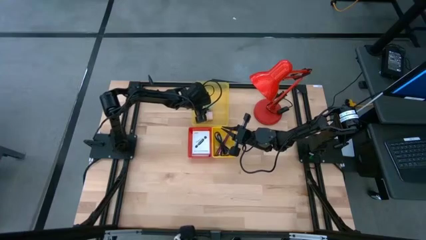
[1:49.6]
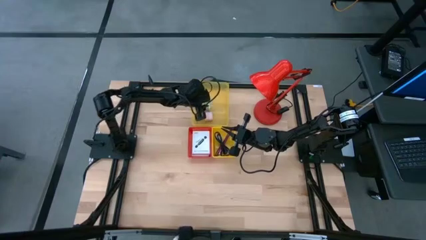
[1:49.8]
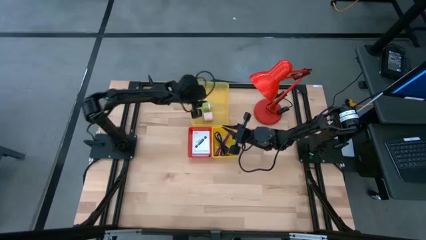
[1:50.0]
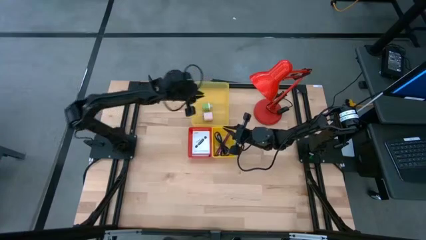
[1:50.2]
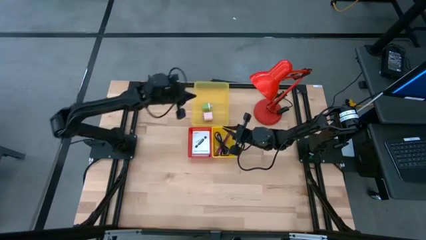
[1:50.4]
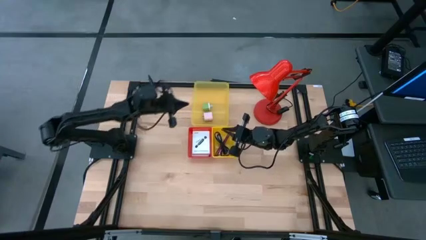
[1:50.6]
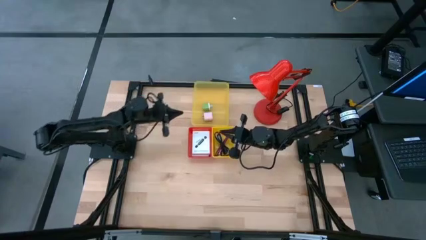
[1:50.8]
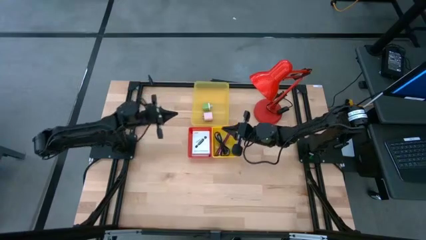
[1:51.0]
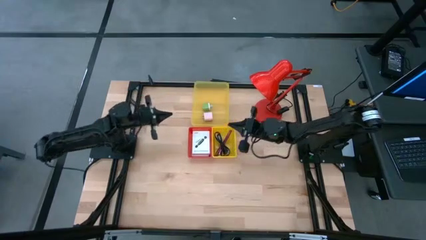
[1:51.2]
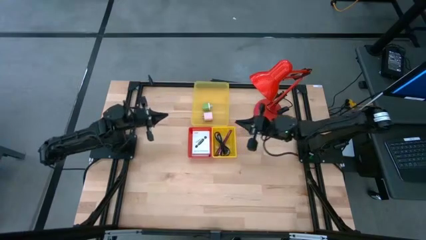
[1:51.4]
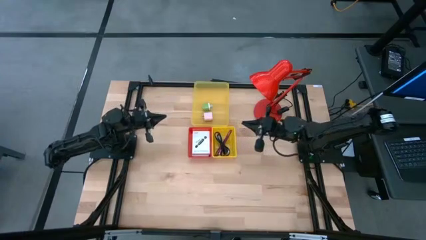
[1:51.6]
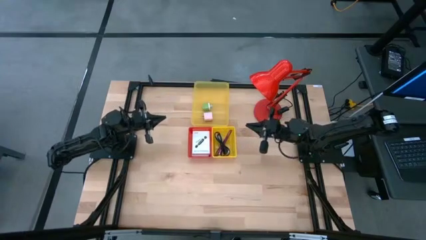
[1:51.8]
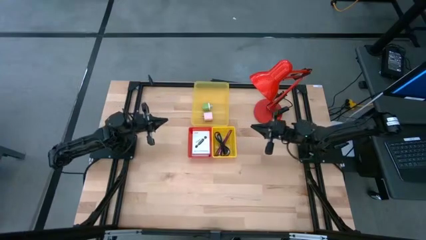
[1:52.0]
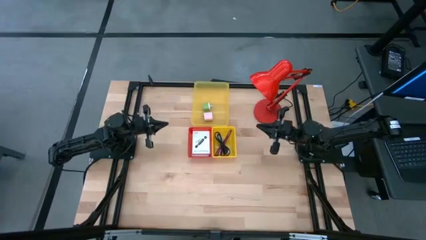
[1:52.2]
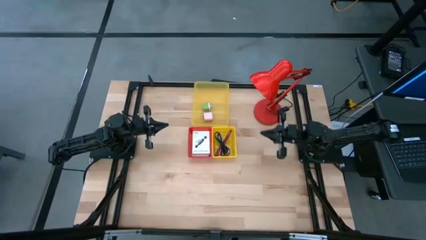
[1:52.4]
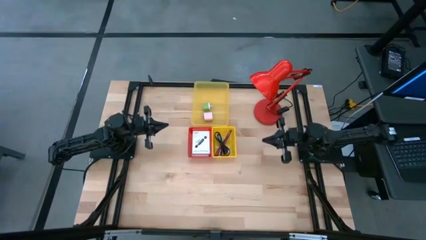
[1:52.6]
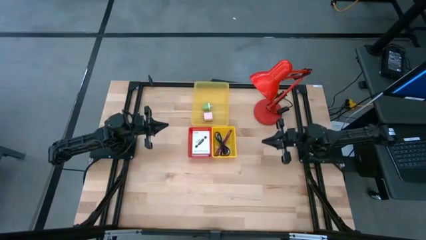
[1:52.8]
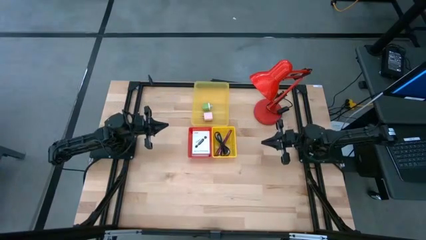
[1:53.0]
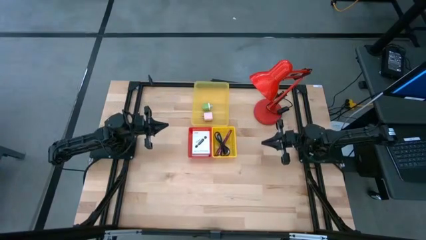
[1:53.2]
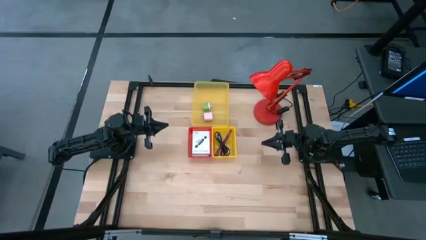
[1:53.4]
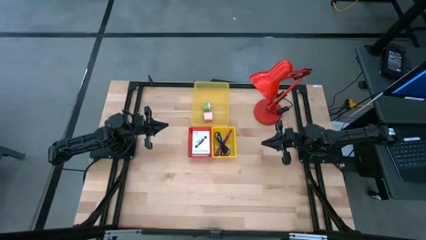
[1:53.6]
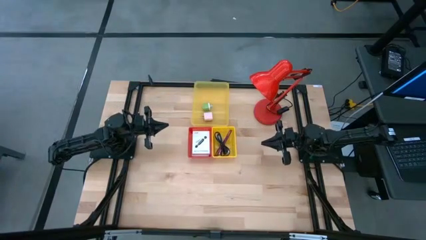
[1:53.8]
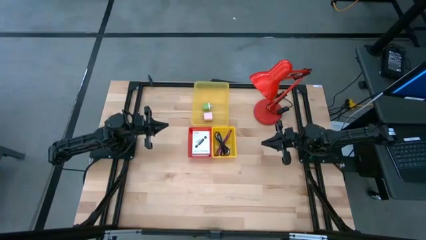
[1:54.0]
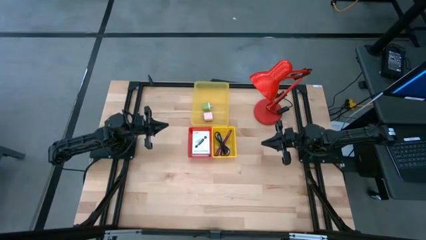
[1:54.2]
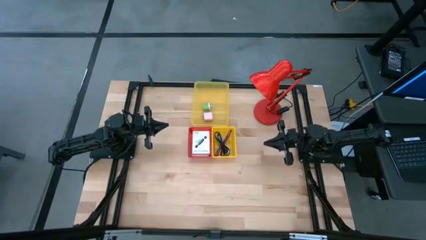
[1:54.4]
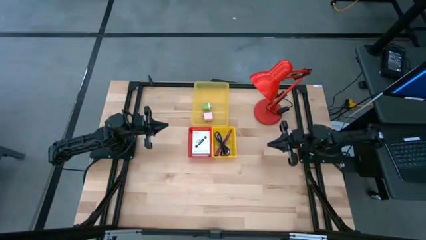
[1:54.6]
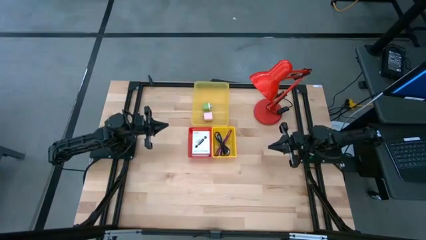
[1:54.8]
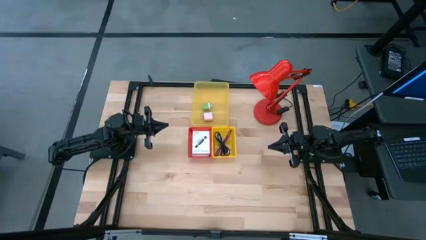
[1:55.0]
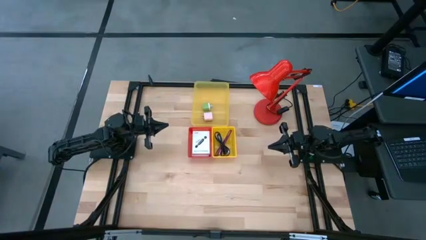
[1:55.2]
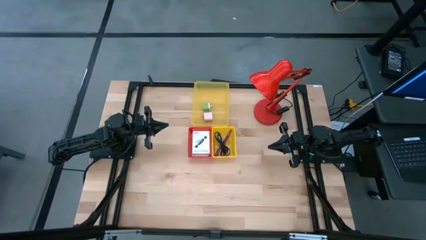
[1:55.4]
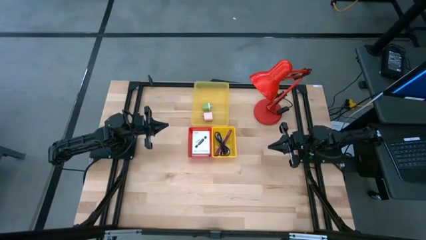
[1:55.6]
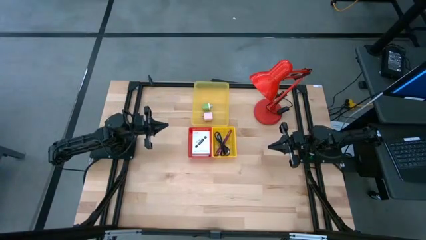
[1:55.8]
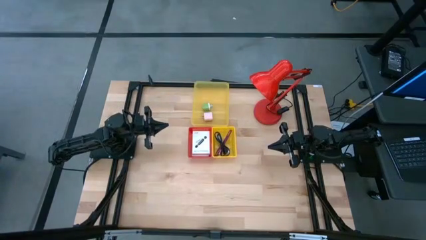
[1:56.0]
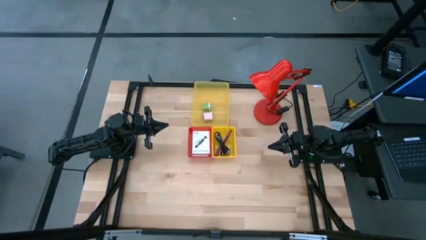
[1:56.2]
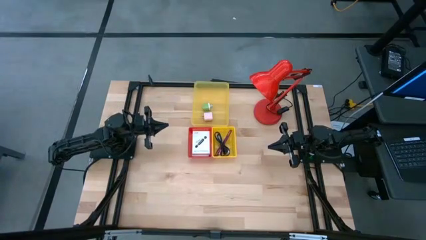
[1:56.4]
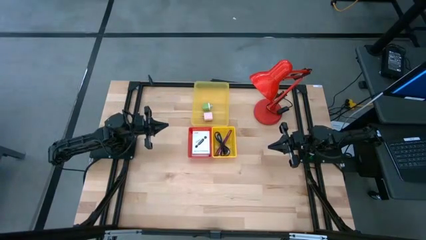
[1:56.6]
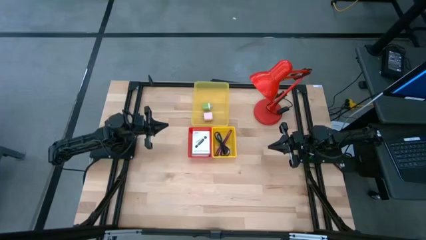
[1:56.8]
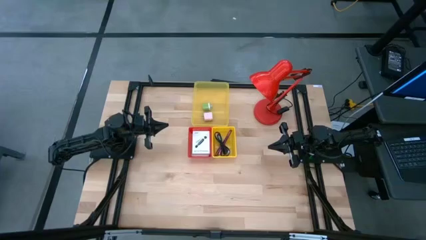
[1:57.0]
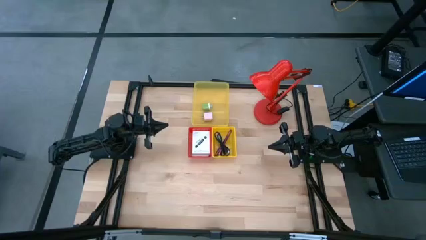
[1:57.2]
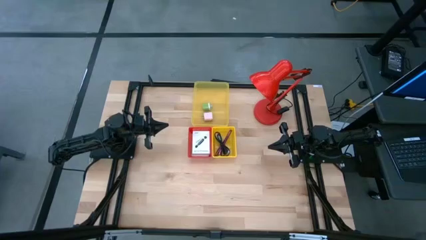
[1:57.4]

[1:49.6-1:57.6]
Task: Pick and place items into bin
Return to home position

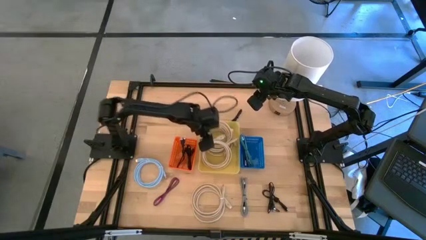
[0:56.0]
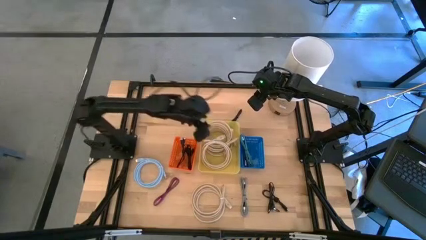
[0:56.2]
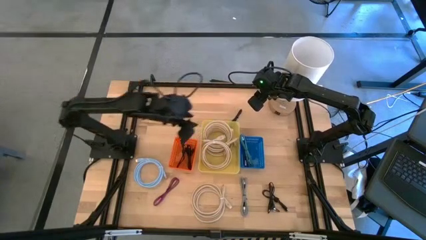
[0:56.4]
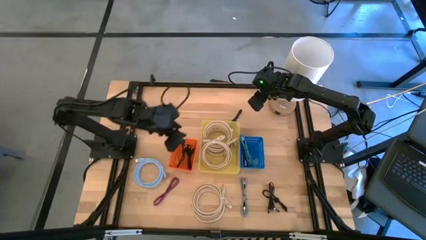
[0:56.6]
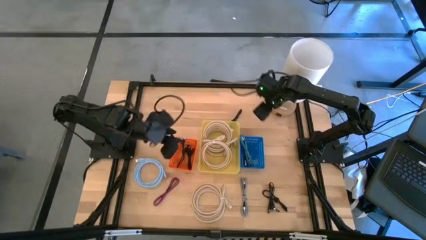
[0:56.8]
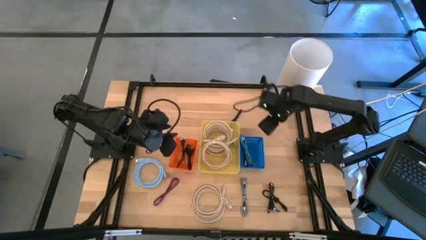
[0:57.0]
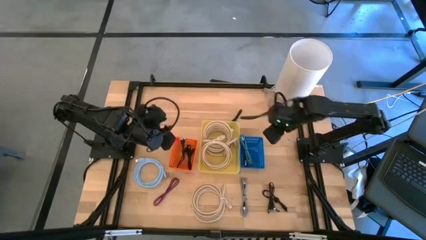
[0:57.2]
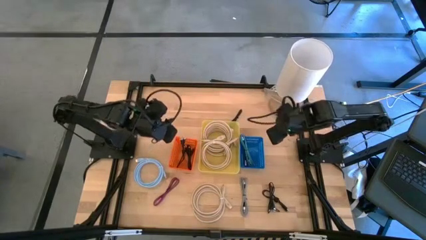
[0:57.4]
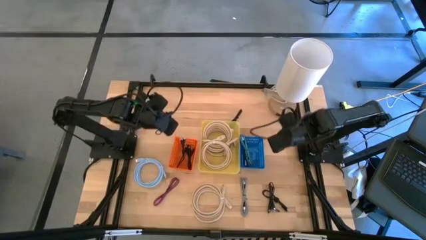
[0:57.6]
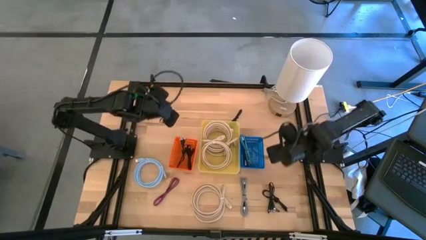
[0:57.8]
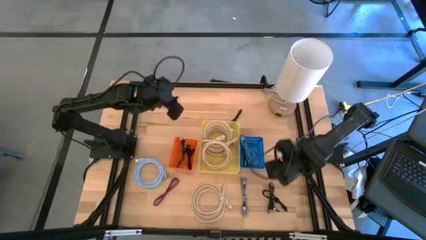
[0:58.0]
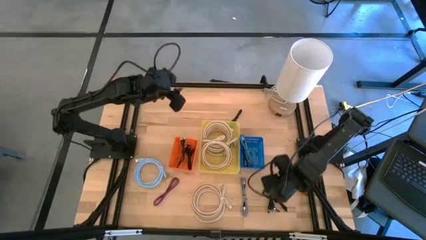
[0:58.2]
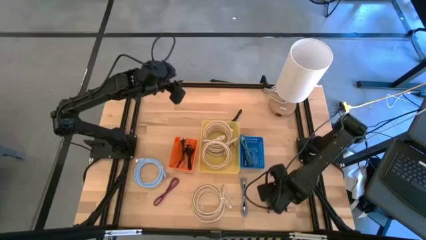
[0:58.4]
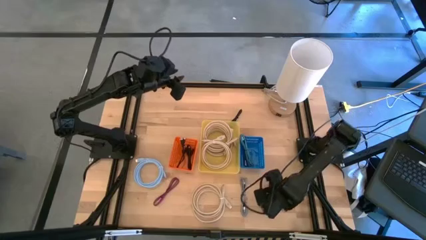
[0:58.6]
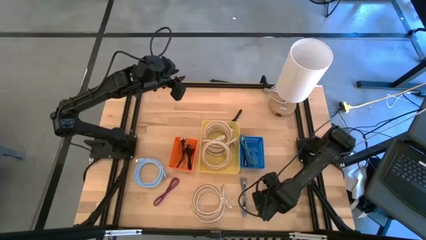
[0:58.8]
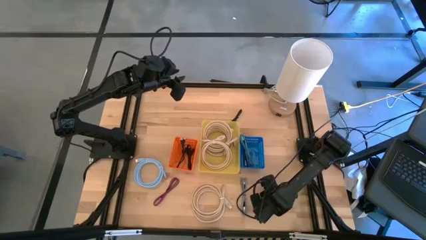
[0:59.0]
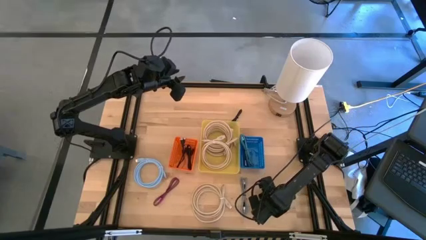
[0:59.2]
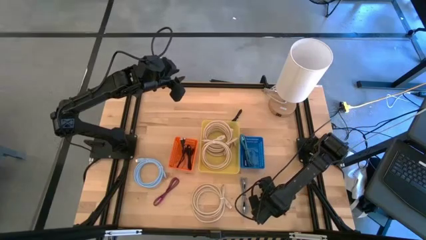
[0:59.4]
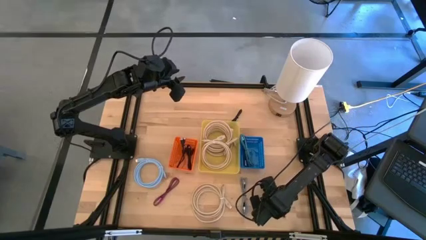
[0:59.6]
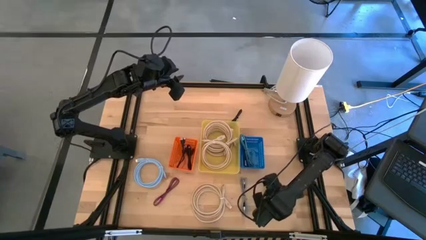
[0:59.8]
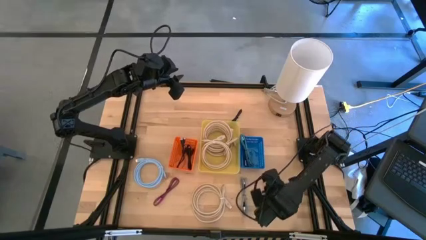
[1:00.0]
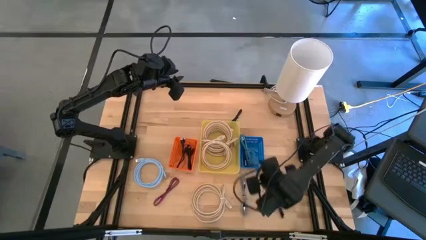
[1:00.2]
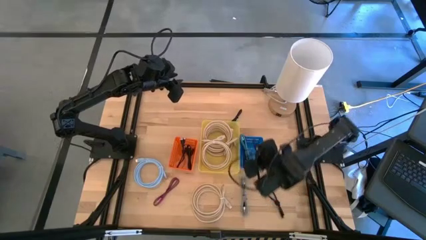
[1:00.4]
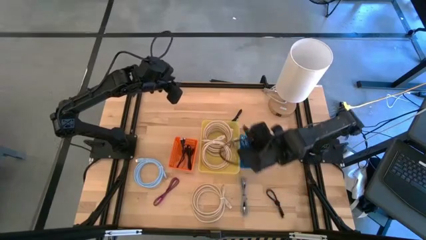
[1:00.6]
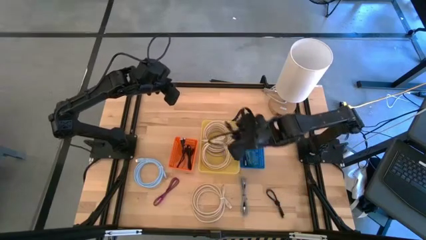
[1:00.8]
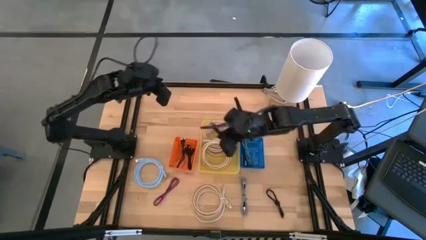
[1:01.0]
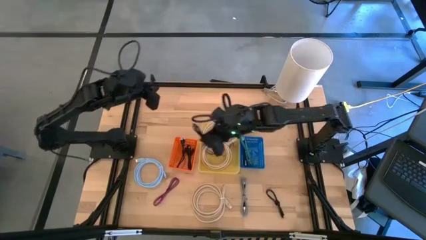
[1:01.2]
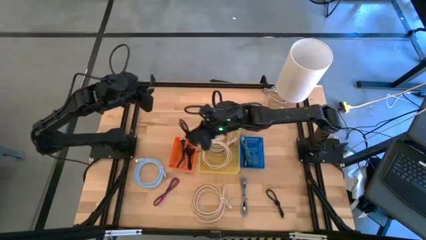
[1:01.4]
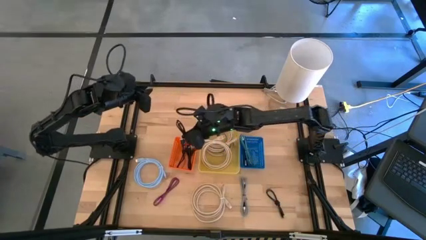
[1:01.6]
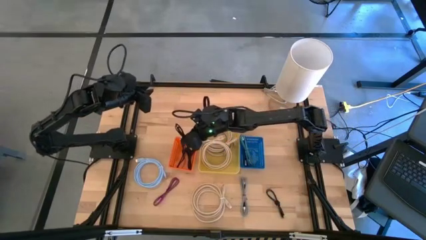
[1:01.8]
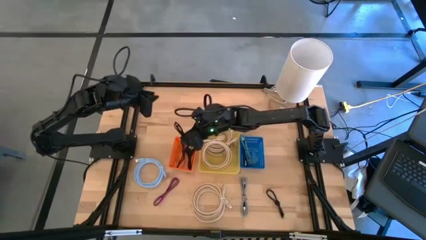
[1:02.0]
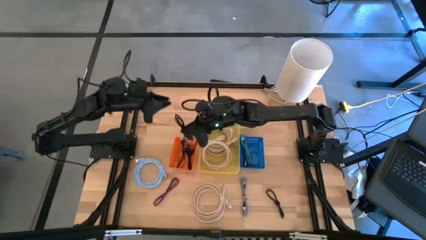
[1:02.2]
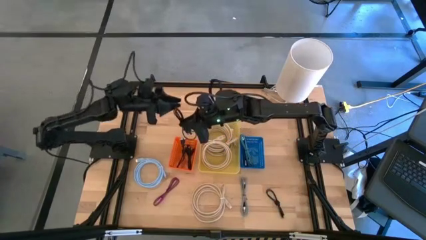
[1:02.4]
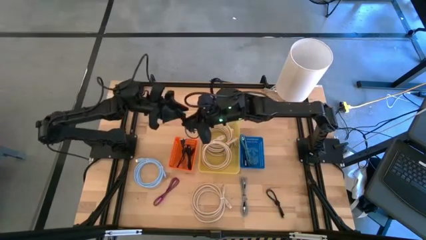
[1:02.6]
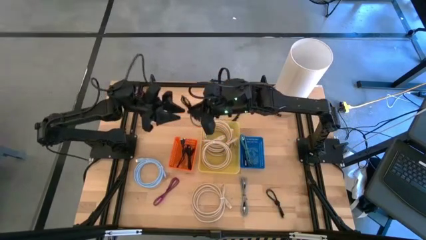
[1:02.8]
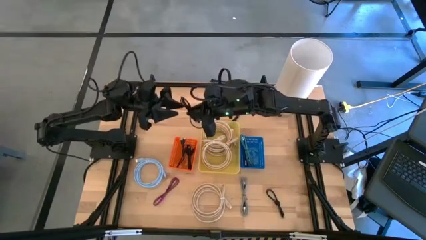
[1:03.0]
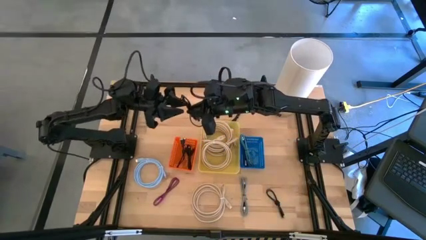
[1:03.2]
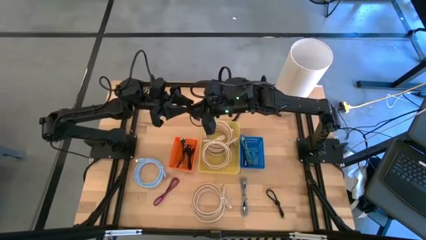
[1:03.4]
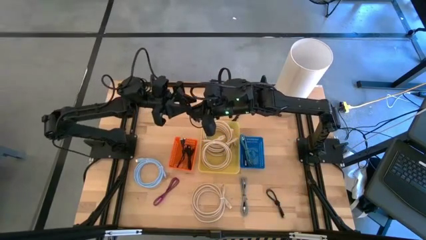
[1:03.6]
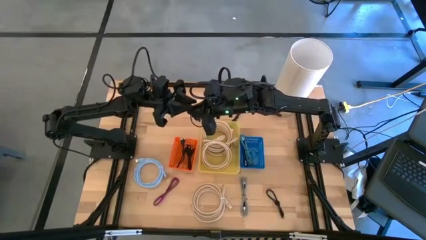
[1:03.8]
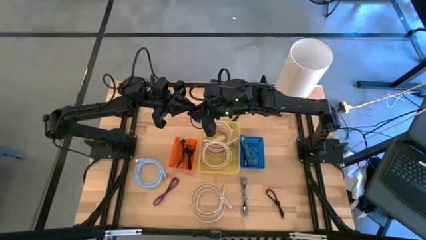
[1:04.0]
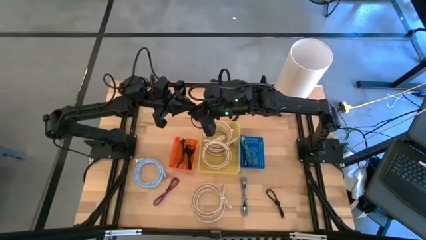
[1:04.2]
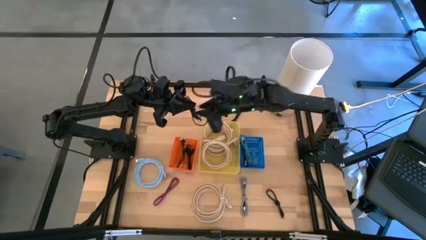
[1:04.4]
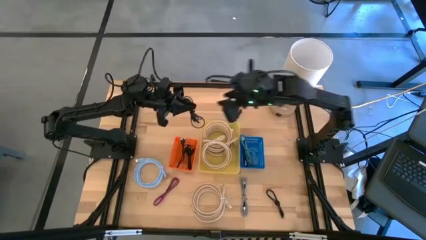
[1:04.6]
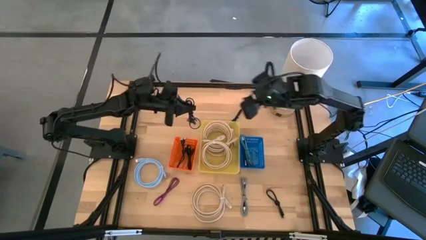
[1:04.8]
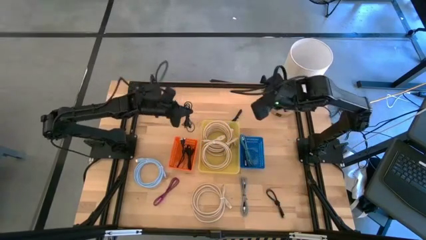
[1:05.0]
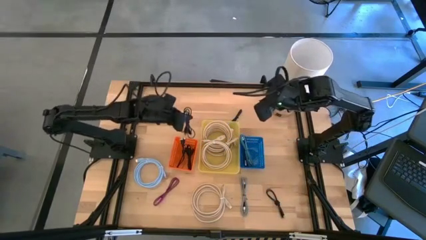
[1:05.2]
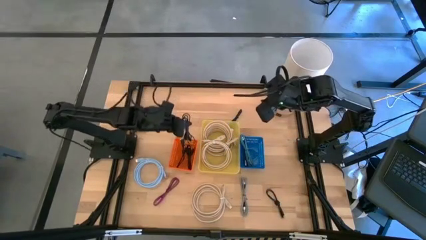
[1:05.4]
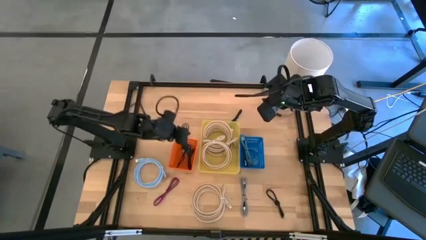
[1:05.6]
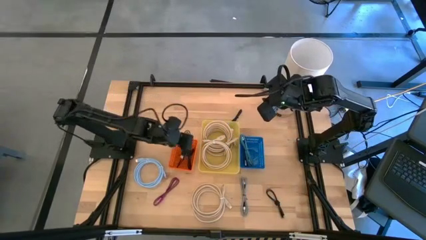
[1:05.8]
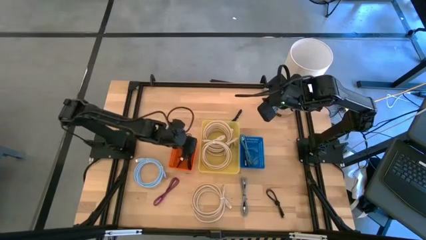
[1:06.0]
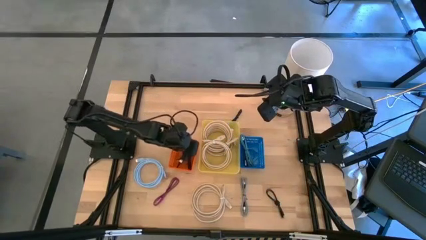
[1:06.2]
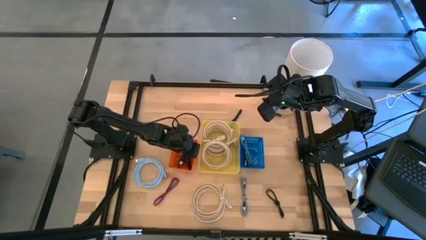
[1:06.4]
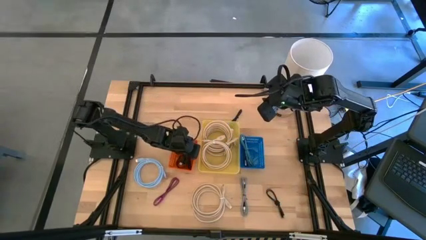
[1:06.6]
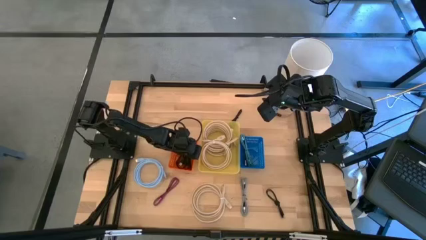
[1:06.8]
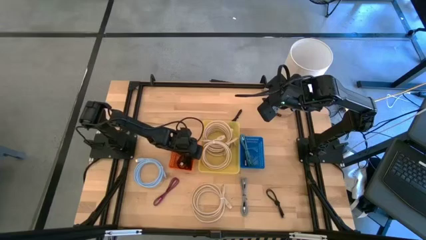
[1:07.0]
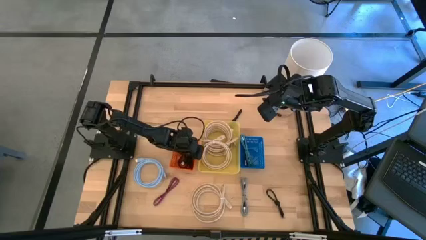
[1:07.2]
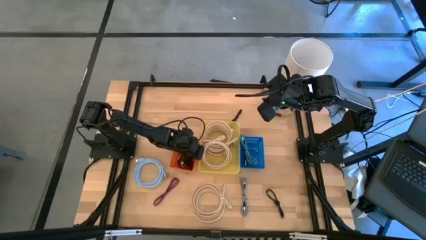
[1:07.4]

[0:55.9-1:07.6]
Task: Pick & Place USB Port
Put the black usb cable into the orange bin
